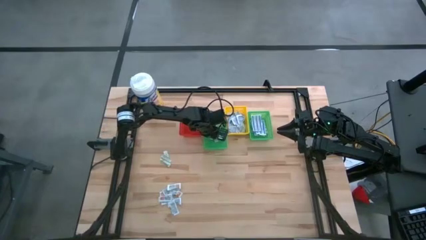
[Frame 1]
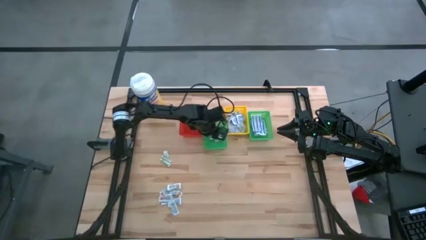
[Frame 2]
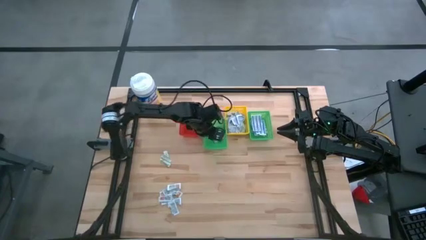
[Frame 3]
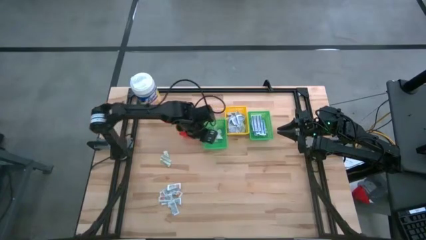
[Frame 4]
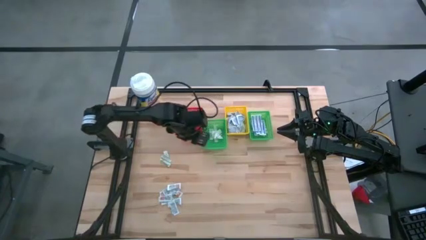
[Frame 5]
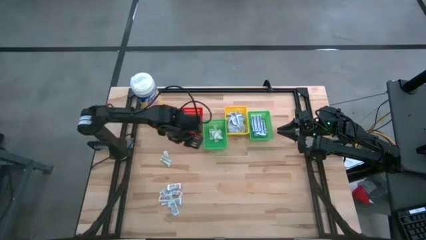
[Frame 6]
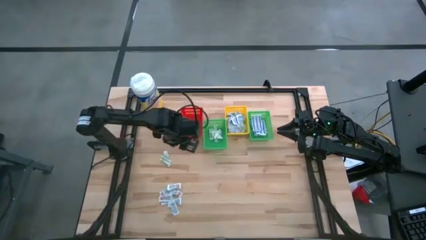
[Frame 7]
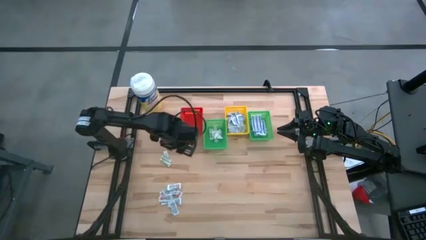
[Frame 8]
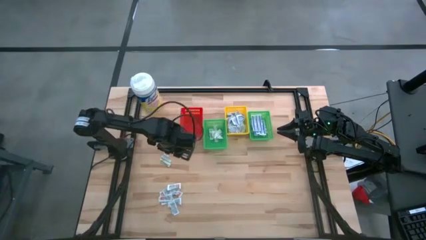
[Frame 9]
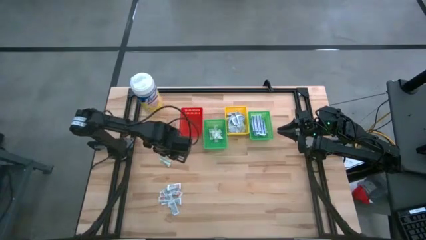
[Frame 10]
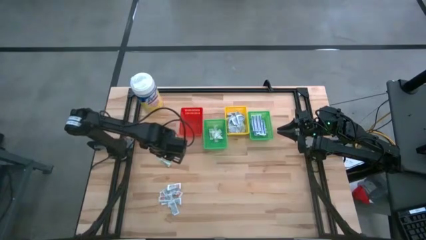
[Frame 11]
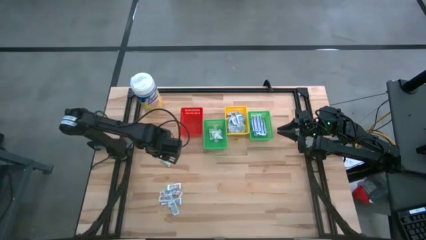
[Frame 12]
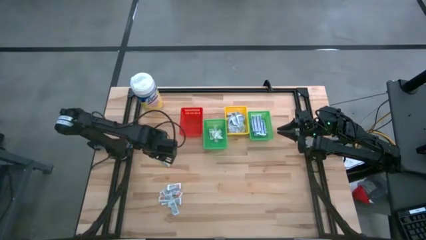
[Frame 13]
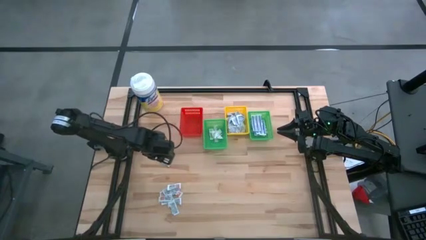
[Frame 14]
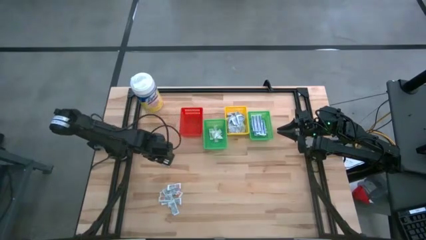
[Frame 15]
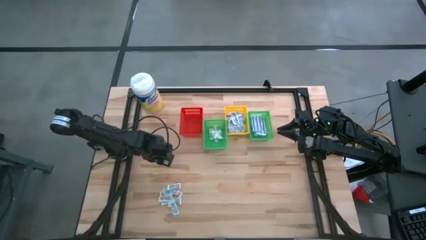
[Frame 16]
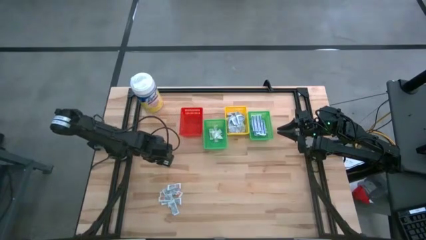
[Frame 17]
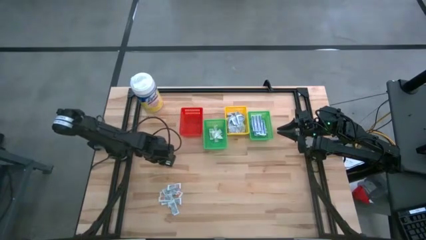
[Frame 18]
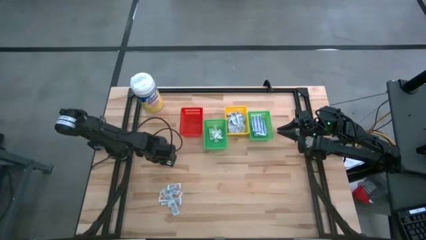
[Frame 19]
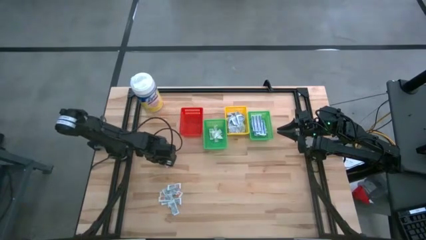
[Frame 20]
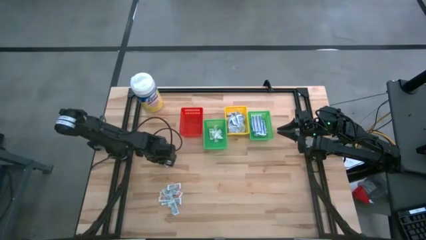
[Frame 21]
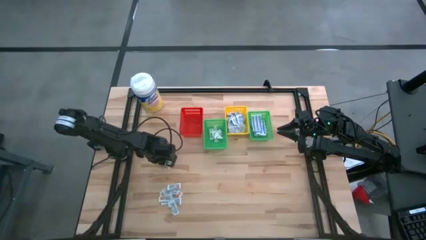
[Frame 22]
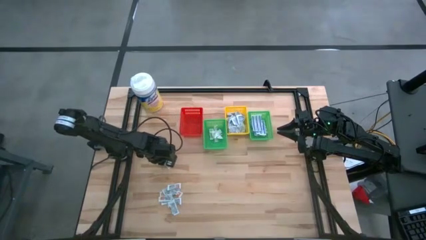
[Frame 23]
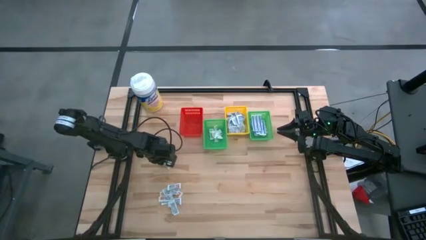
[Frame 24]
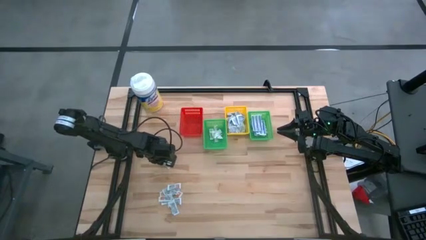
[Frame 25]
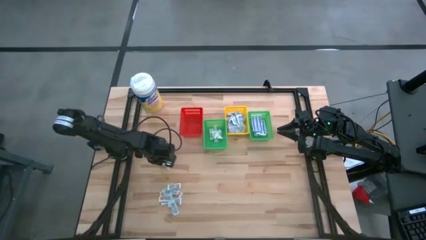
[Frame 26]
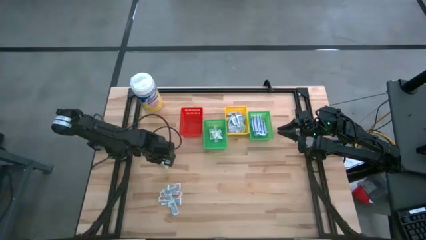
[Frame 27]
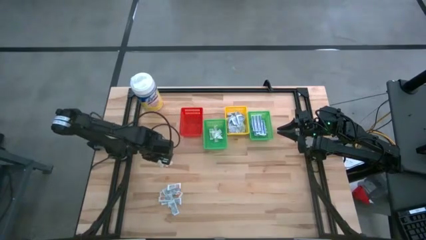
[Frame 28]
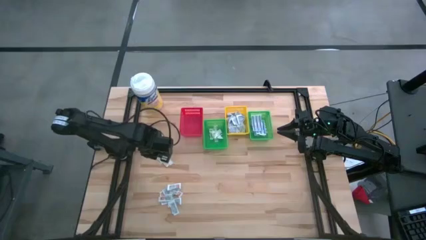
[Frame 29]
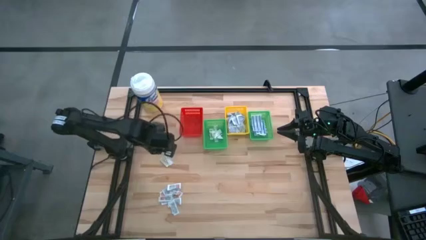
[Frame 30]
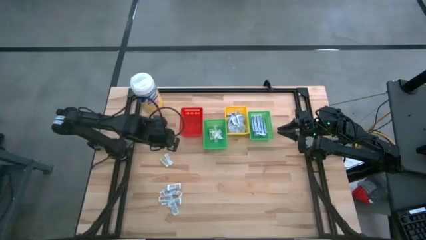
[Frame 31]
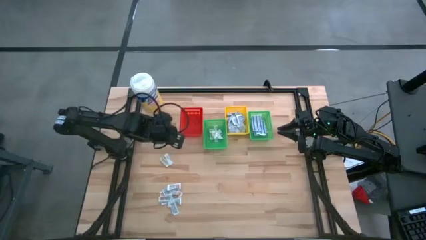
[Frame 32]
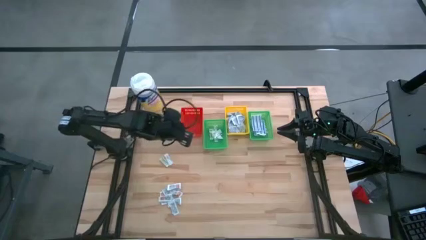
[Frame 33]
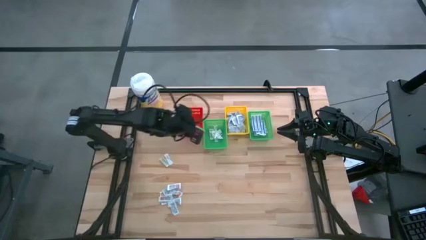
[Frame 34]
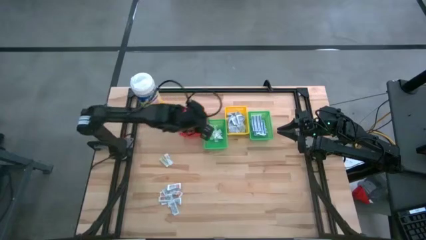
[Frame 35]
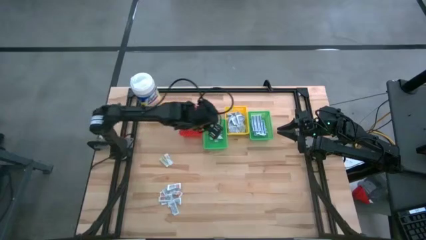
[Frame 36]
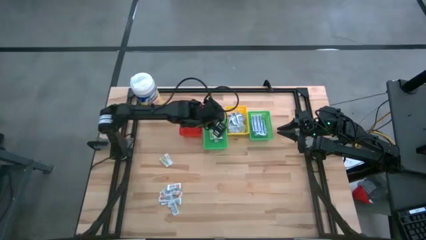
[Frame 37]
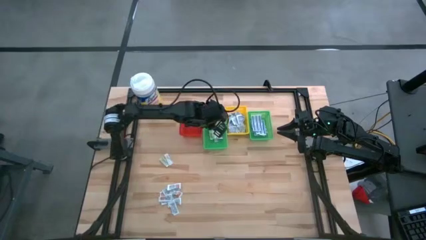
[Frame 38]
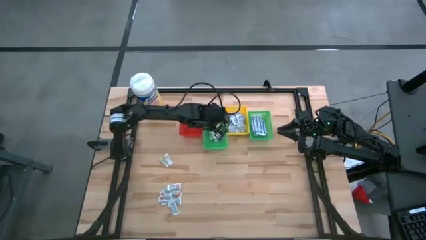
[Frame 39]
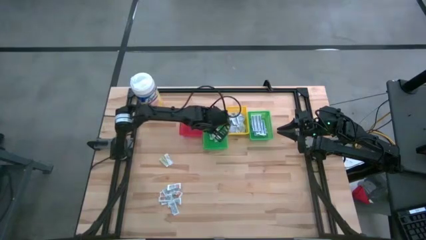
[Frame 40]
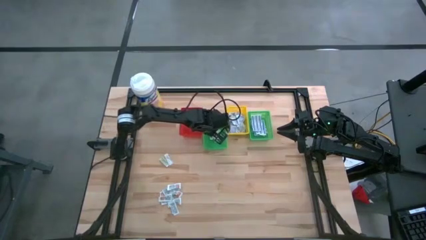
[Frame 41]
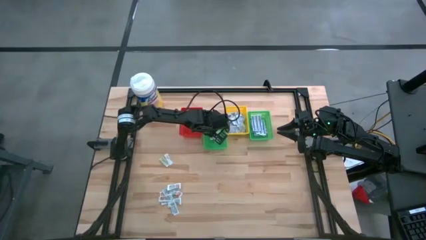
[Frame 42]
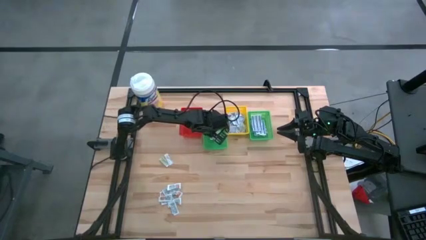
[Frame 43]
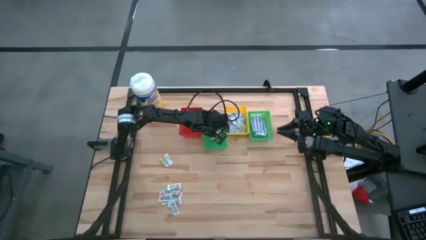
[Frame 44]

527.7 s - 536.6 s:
Task: Pick & Place First Aid Supplies
Put the bandage into the left green basket

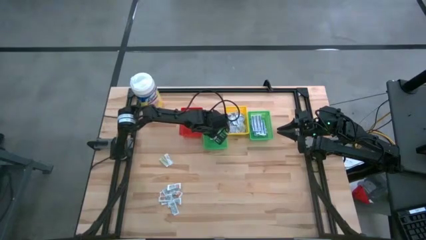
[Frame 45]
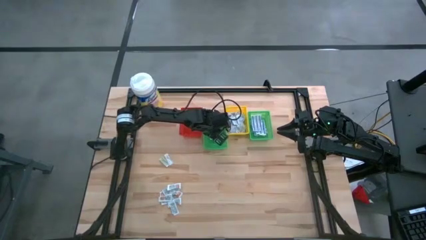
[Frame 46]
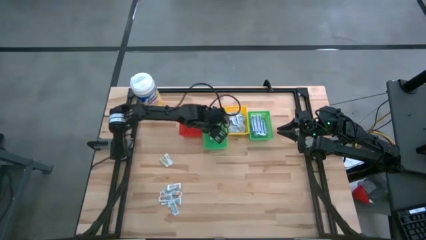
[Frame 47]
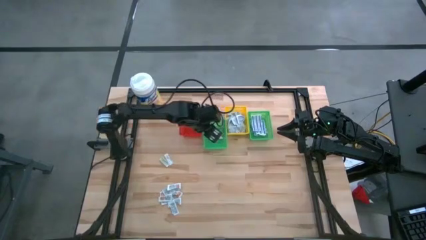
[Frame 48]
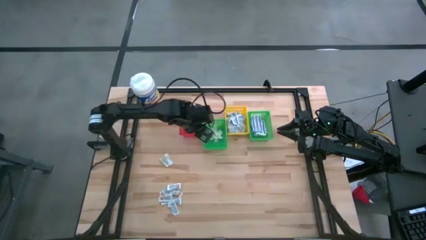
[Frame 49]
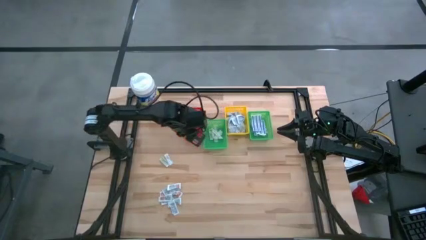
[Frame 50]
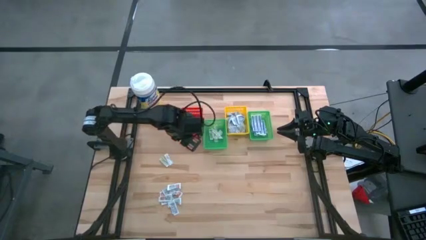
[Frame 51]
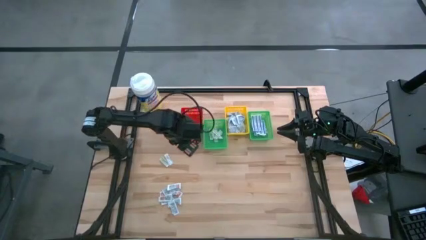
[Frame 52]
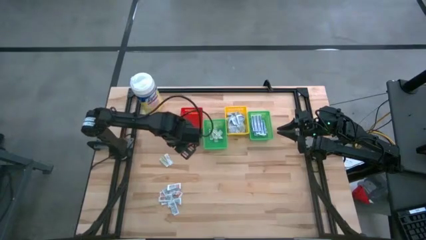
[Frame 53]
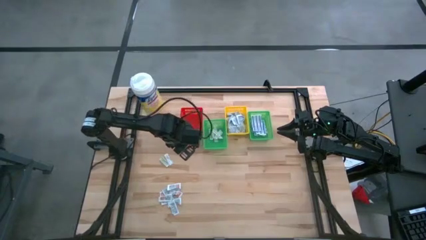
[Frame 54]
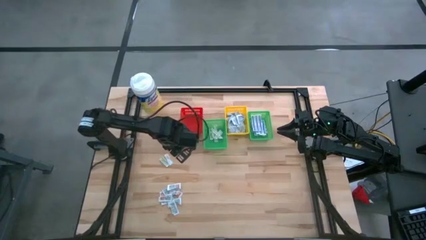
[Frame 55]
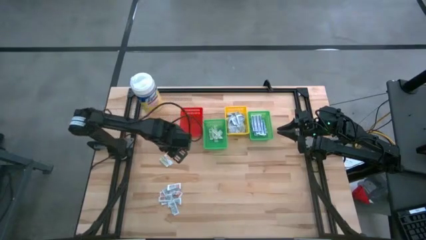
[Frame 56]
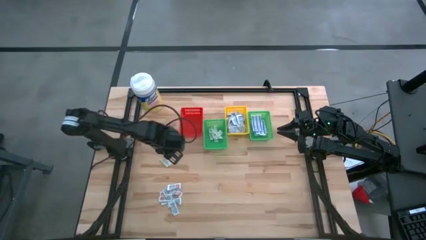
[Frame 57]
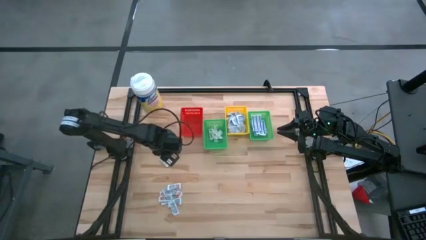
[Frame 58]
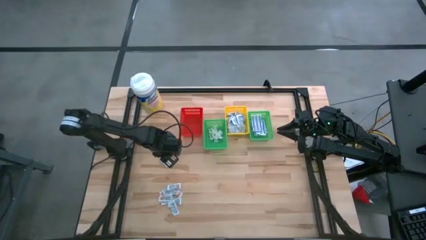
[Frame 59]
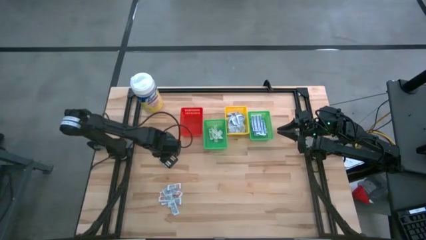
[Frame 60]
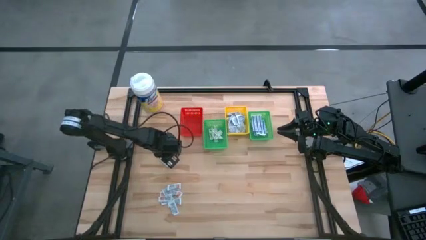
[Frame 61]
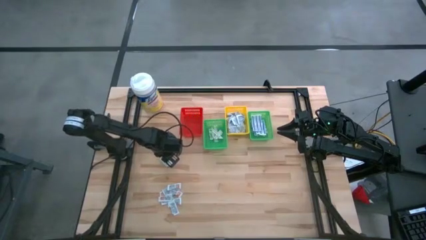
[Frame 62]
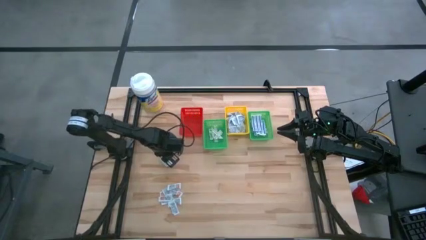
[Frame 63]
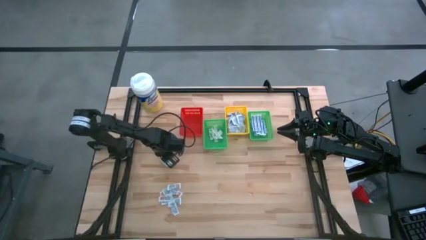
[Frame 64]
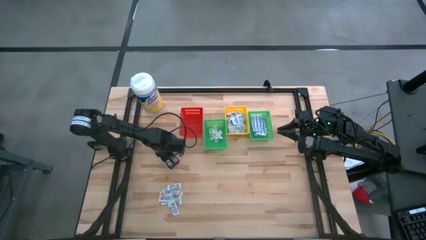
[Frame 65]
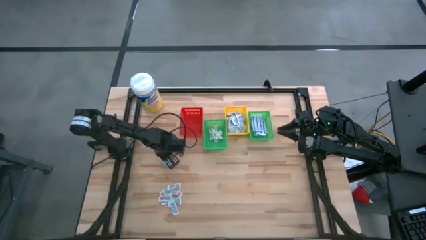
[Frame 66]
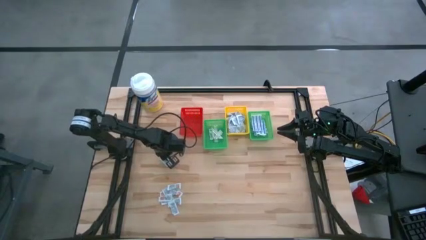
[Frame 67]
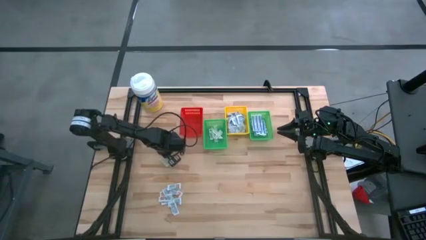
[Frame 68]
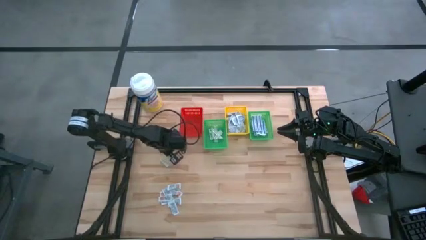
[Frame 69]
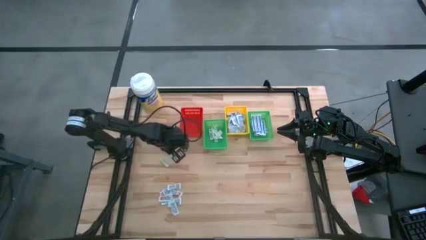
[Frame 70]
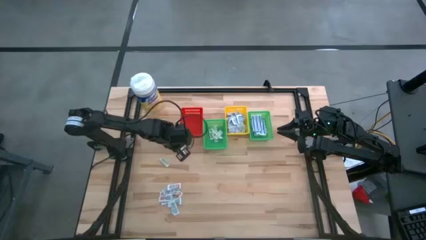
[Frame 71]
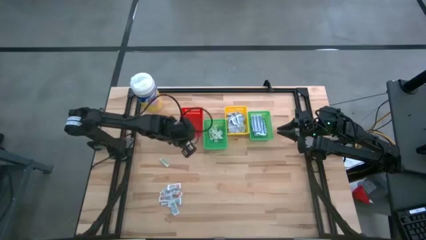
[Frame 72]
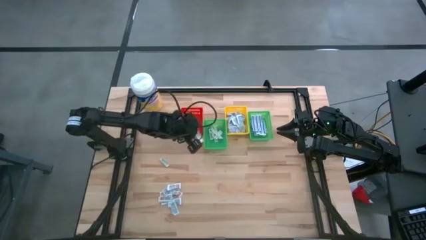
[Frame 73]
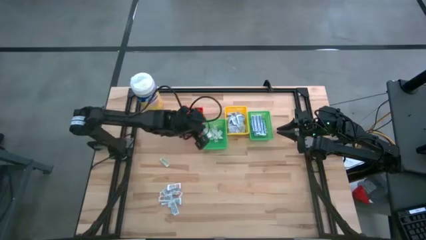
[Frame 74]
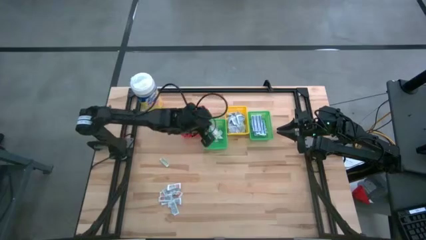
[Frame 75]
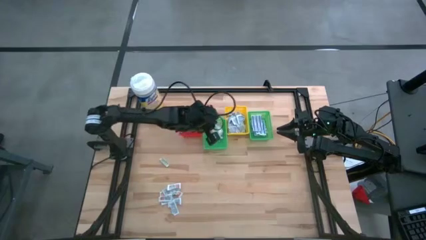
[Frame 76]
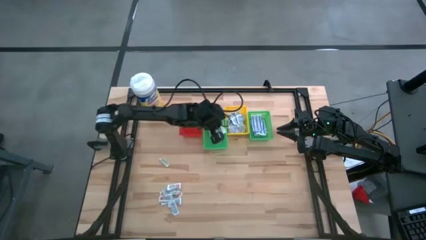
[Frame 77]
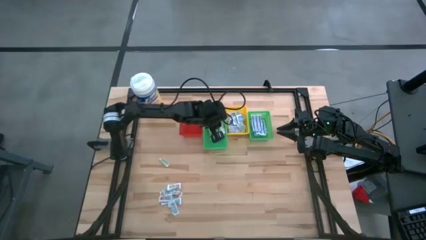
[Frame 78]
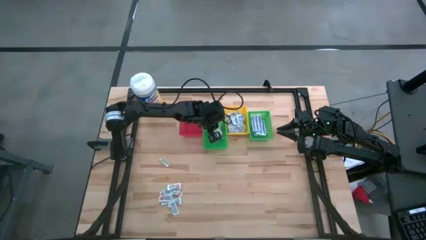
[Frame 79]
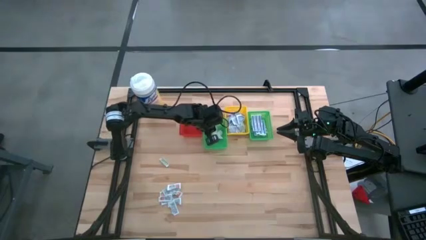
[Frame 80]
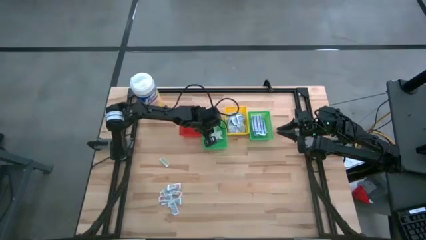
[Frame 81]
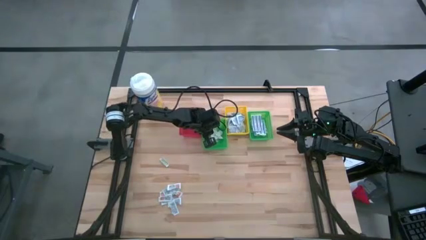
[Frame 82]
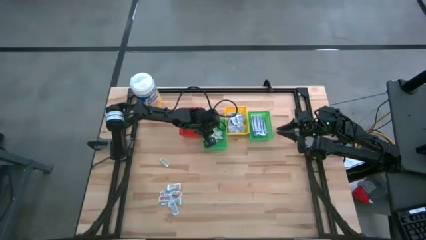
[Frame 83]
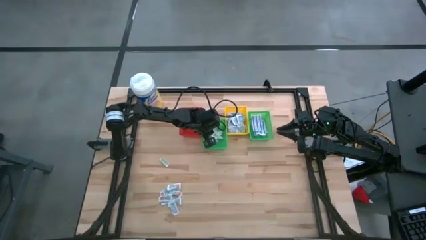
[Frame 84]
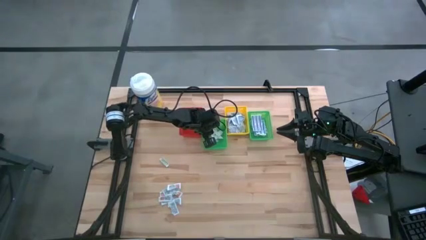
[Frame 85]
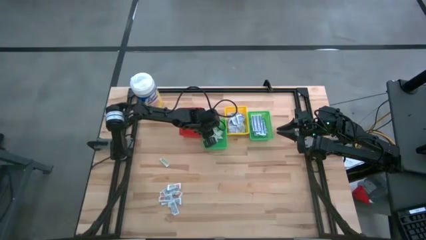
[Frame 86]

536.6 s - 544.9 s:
Put the bandage into the left green basket
